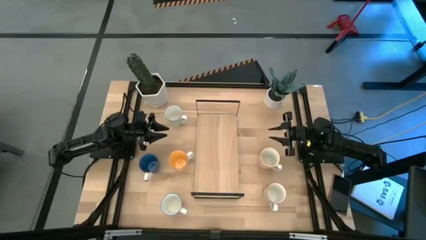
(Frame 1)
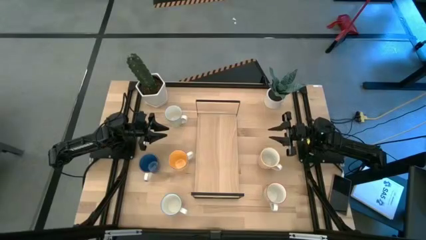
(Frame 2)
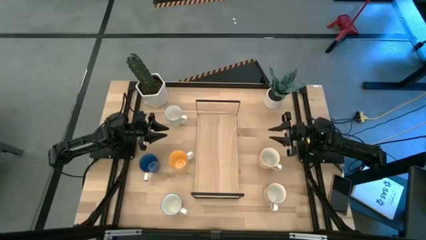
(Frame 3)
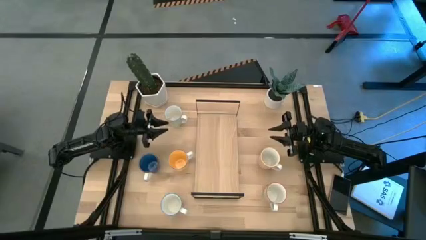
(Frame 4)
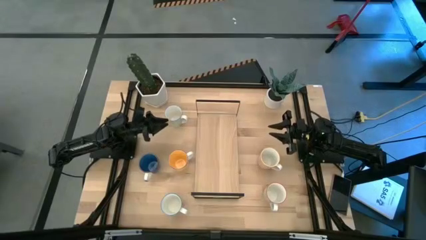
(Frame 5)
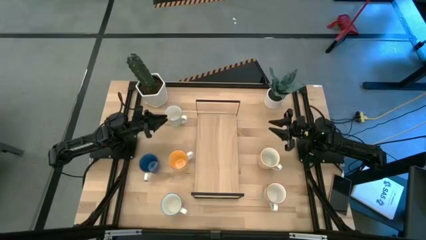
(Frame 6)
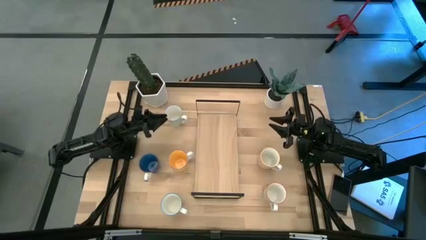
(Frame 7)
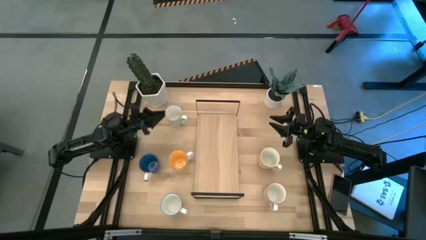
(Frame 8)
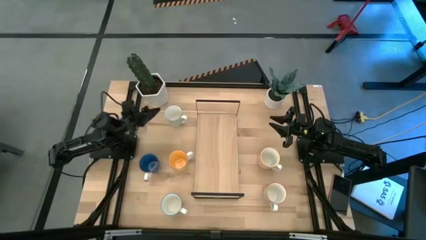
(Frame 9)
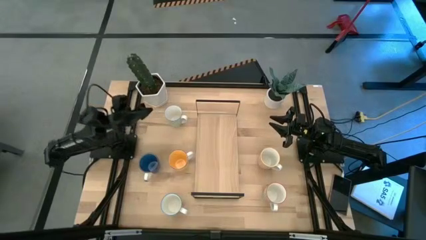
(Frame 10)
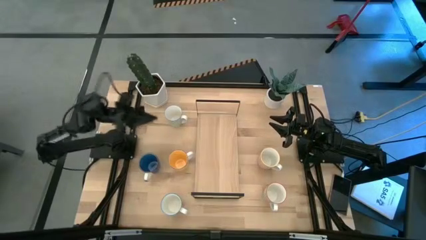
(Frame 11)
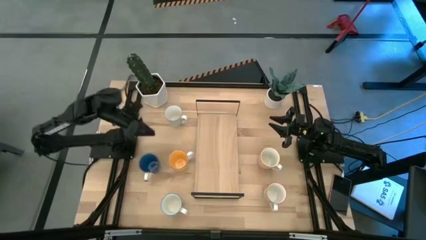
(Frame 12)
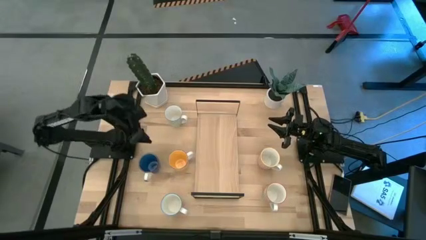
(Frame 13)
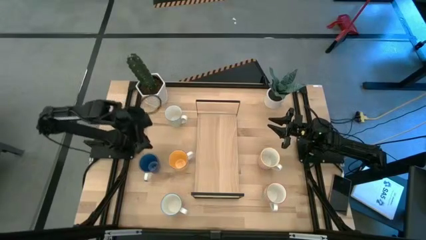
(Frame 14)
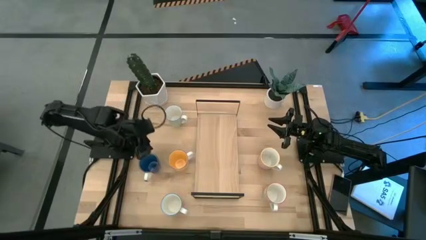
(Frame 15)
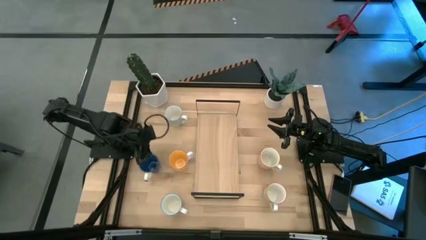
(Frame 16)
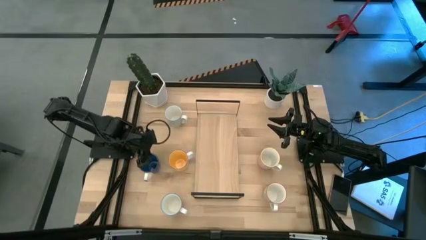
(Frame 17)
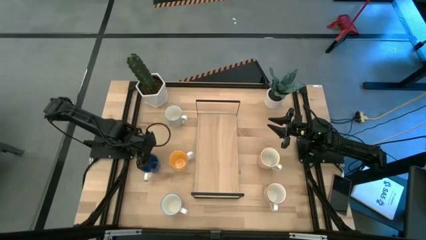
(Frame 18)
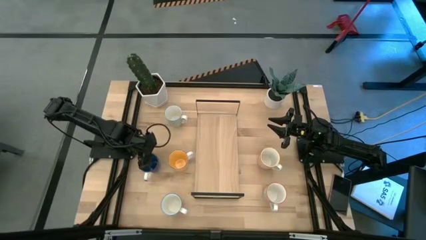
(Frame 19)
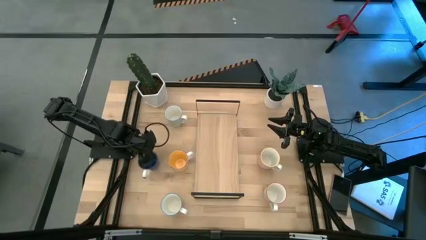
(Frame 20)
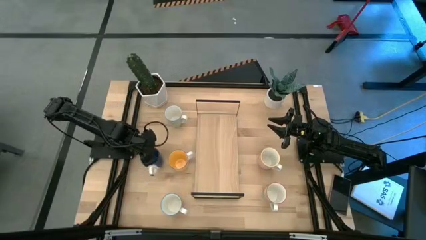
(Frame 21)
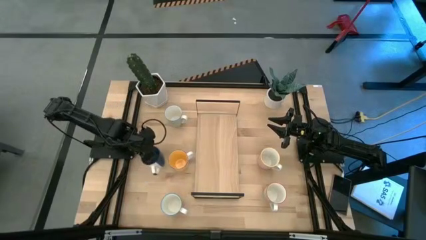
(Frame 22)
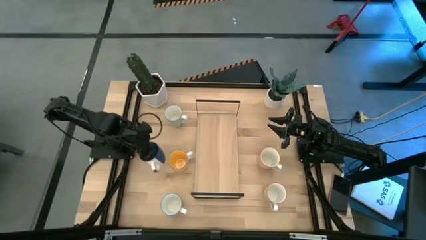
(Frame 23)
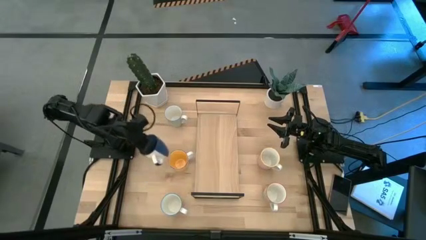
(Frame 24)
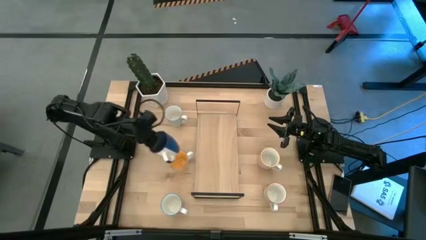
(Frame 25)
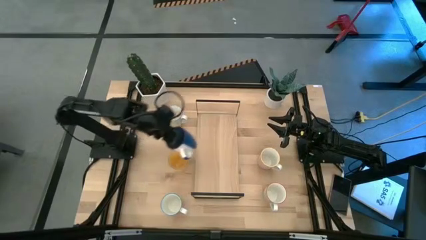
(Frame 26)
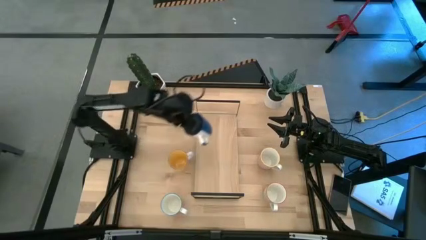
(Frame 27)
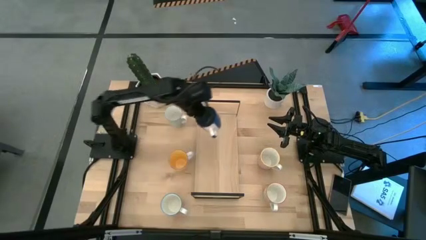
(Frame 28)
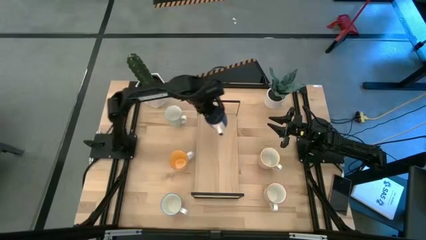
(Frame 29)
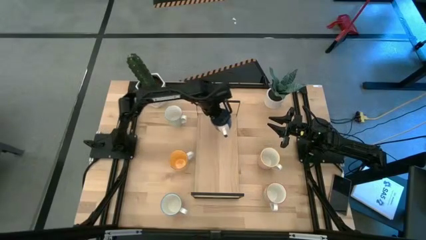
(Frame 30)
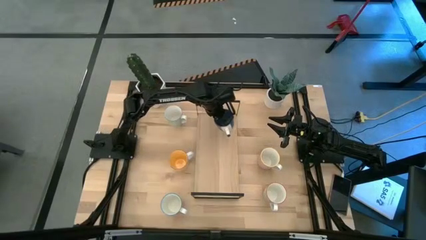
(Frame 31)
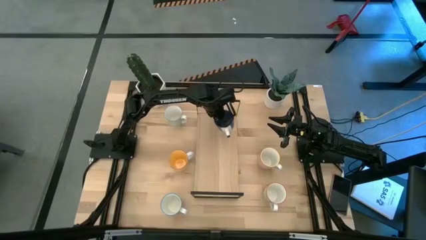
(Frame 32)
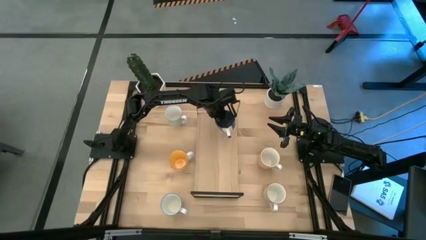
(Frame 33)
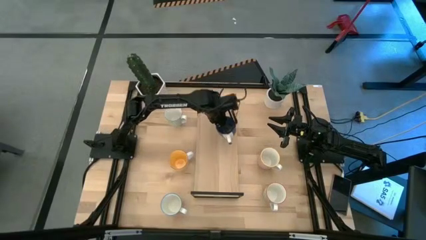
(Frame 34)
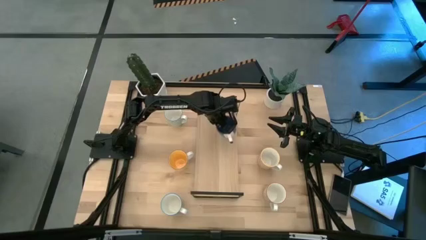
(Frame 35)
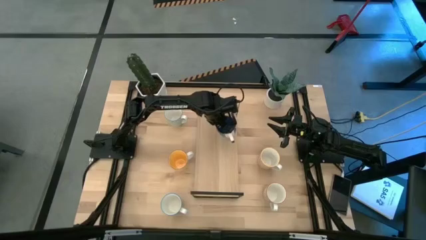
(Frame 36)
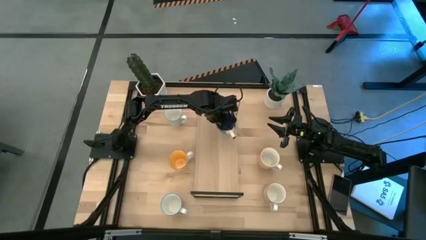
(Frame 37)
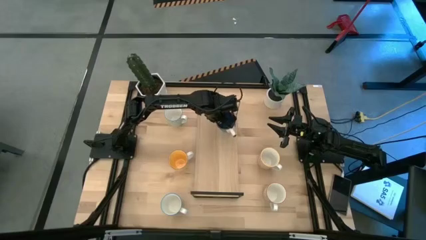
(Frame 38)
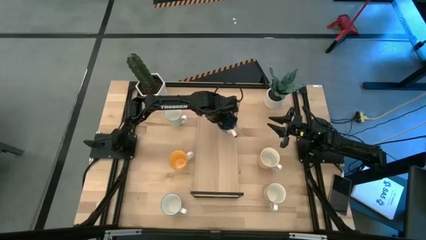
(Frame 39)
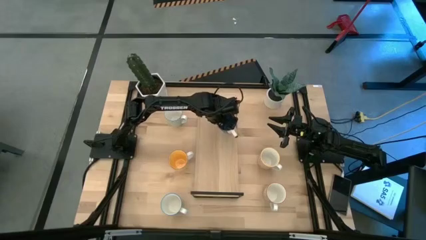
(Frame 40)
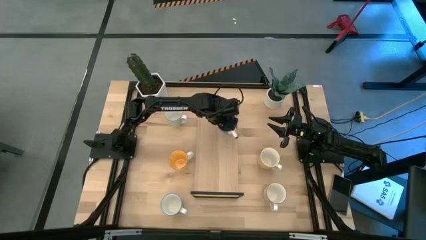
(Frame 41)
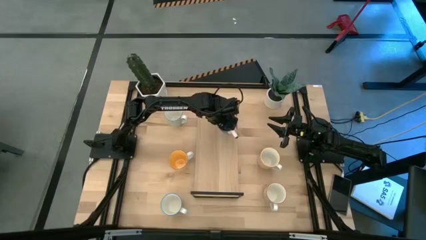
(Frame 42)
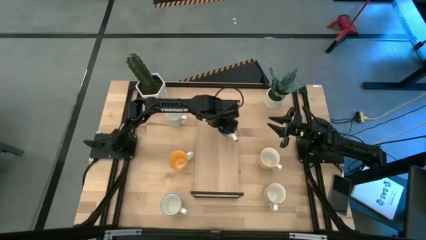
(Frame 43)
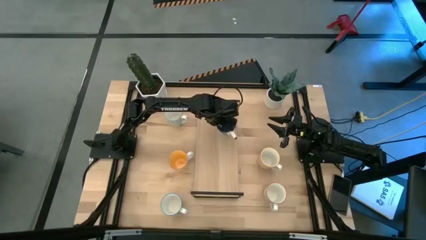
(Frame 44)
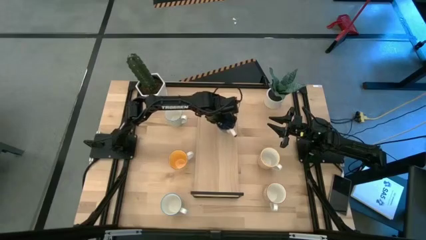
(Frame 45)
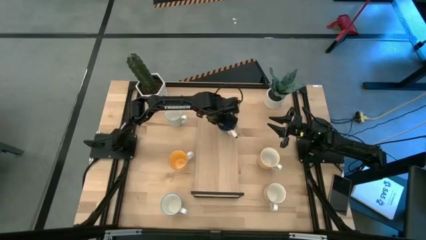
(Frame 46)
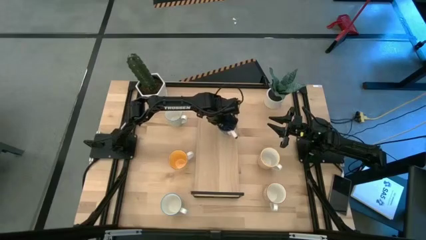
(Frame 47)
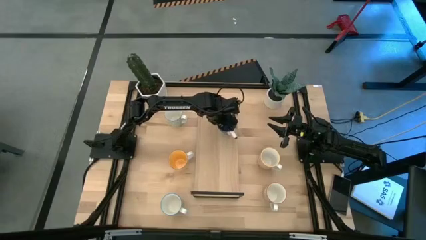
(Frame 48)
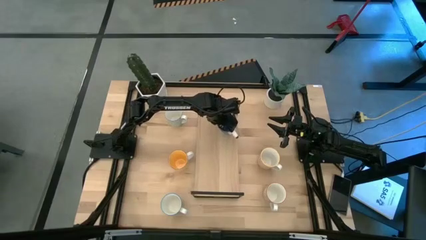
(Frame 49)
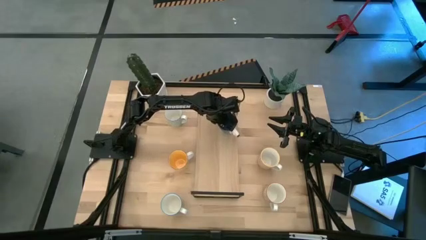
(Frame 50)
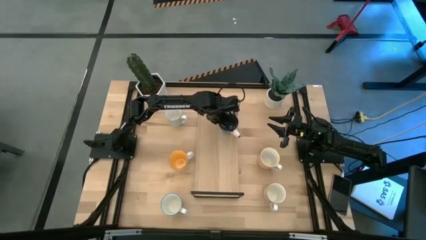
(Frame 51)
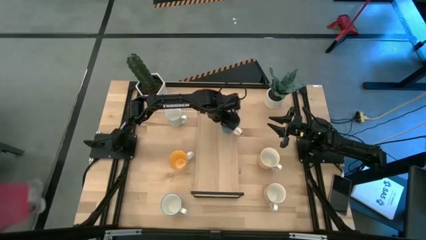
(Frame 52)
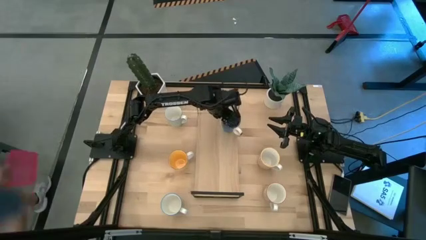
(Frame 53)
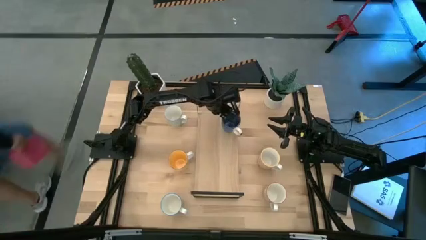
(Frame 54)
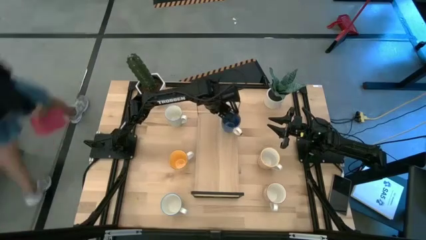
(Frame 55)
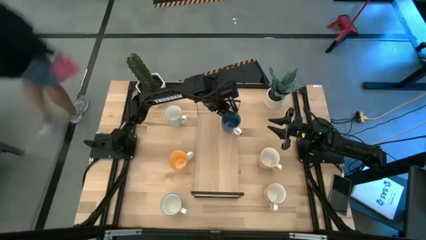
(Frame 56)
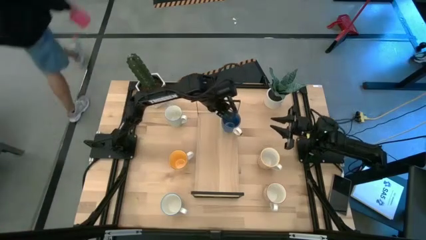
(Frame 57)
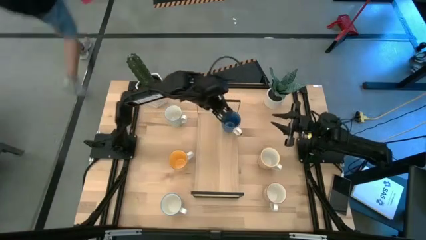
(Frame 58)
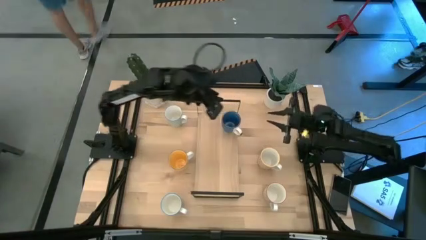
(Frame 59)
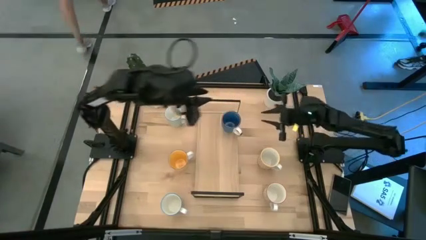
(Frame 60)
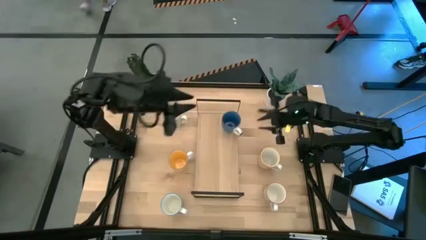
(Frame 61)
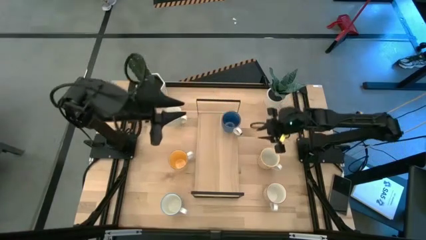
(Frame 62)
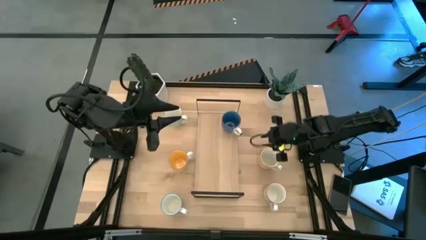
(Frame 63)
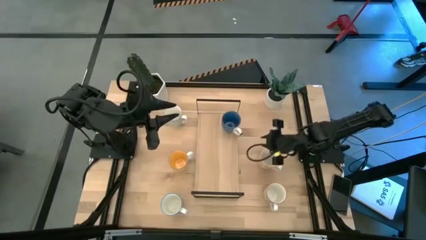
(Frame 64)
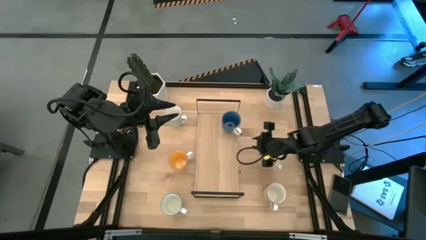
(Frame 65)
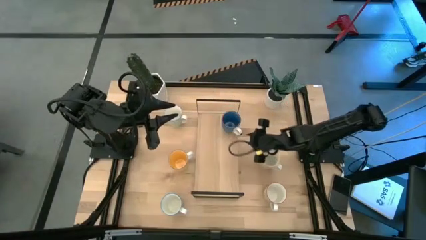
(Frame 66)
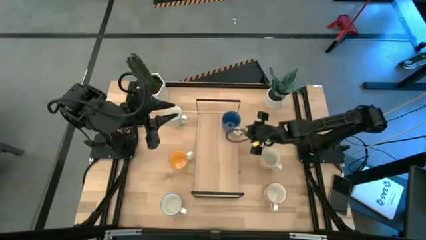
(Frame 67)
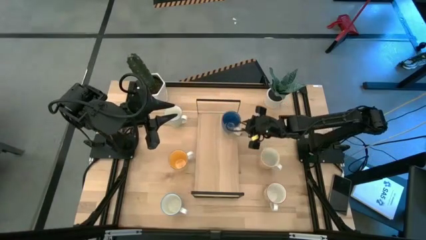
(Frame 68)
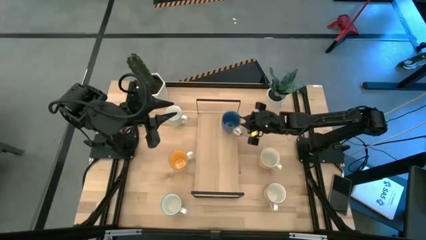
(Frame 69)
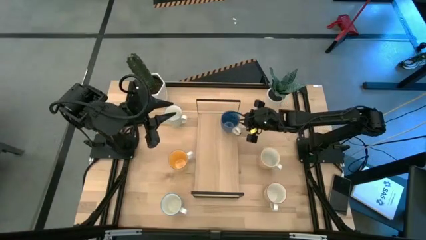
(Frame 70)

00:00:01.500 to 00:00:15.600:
Task: Place coffee mugs
Put the blue and white mug on the shelf
